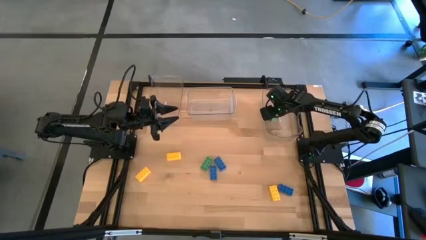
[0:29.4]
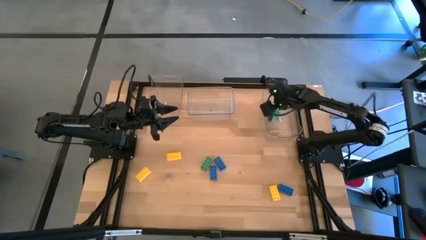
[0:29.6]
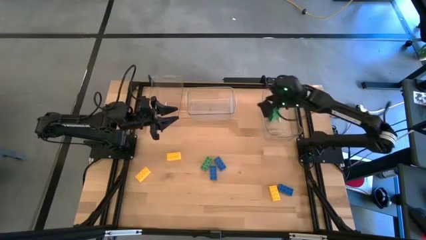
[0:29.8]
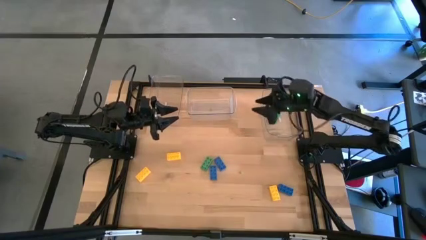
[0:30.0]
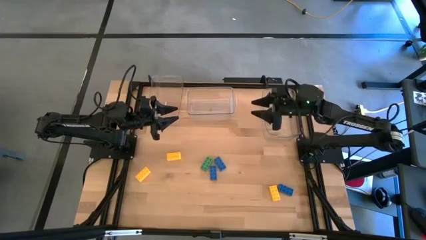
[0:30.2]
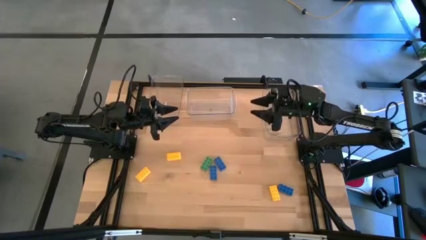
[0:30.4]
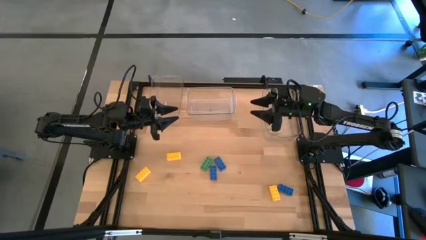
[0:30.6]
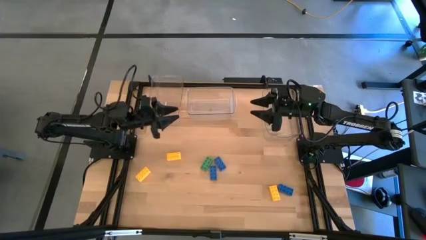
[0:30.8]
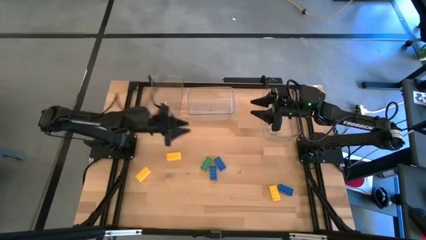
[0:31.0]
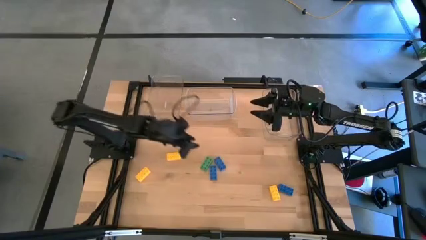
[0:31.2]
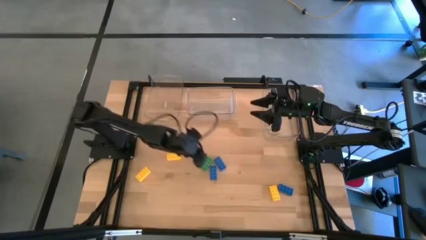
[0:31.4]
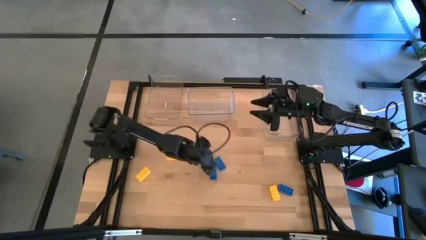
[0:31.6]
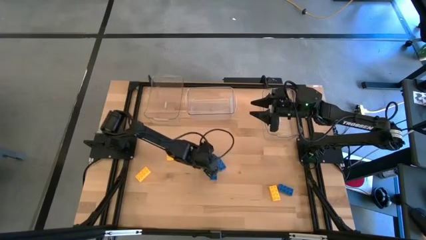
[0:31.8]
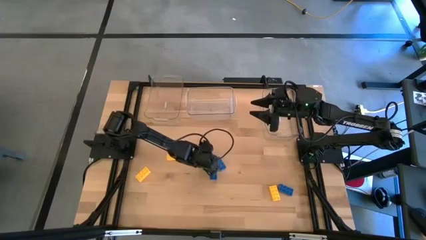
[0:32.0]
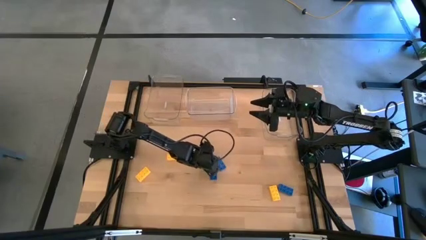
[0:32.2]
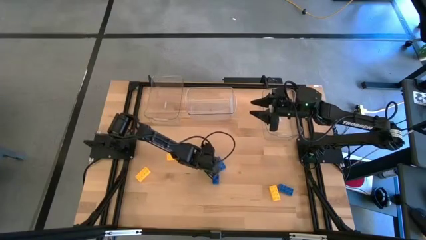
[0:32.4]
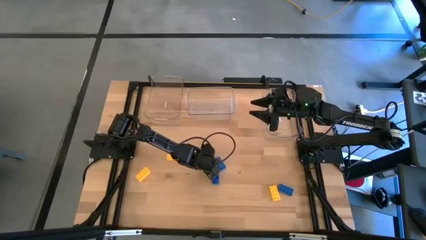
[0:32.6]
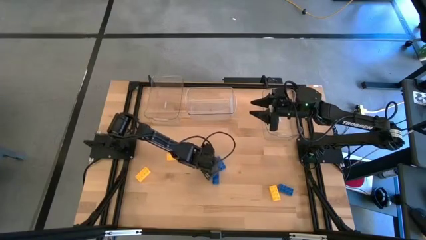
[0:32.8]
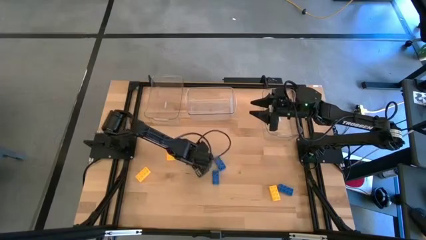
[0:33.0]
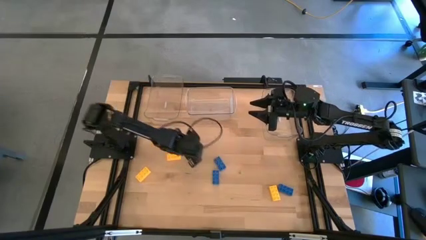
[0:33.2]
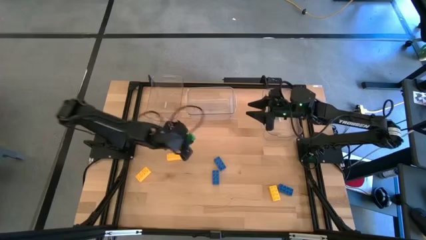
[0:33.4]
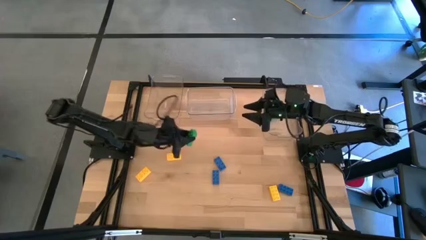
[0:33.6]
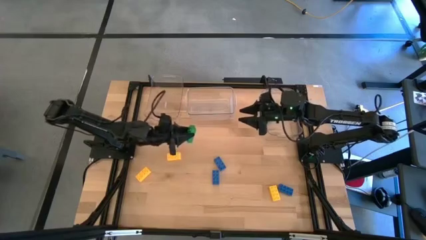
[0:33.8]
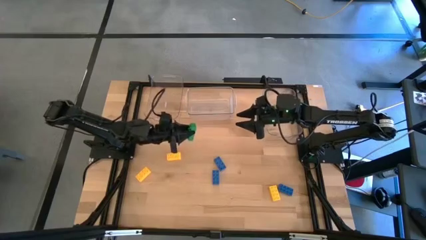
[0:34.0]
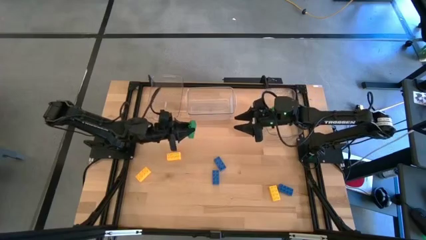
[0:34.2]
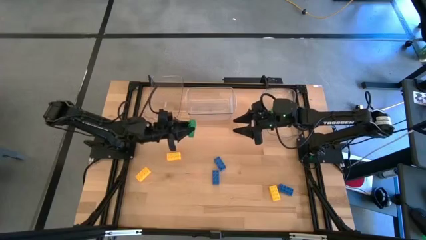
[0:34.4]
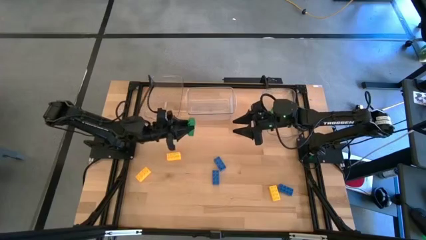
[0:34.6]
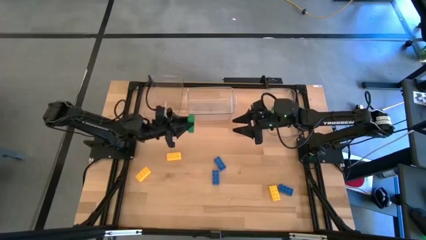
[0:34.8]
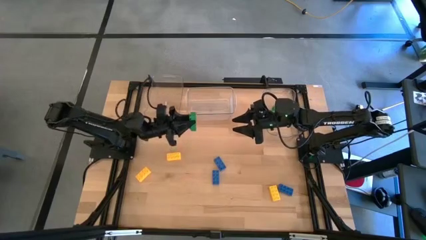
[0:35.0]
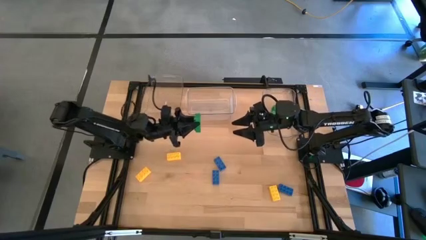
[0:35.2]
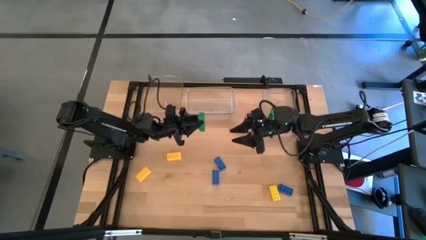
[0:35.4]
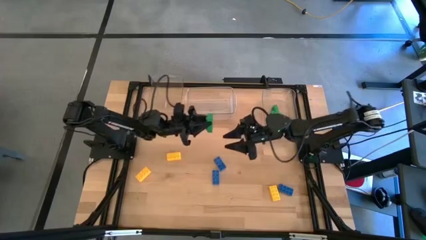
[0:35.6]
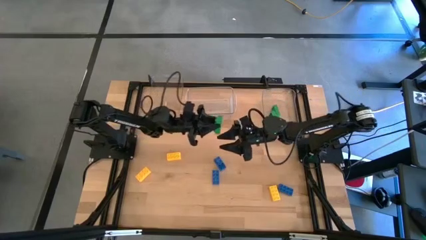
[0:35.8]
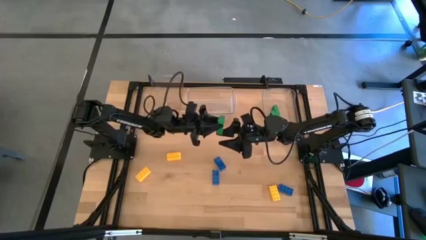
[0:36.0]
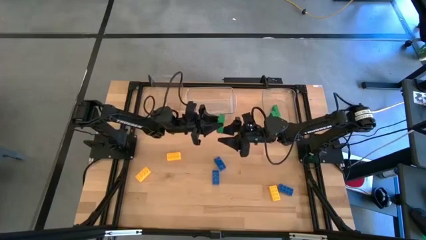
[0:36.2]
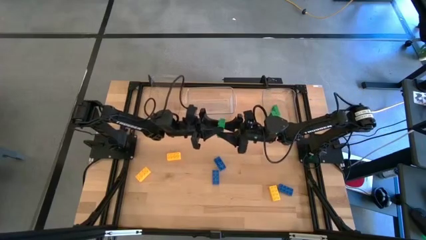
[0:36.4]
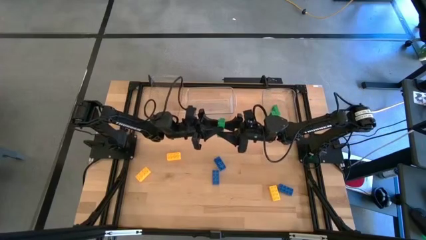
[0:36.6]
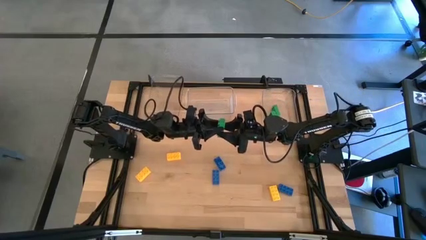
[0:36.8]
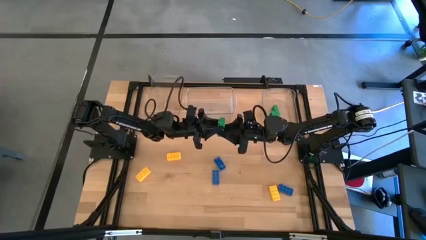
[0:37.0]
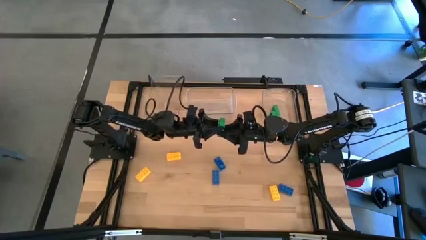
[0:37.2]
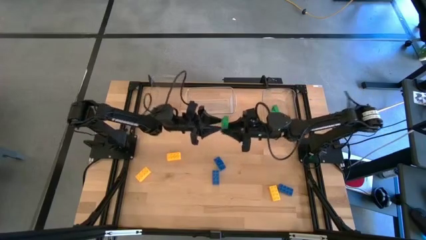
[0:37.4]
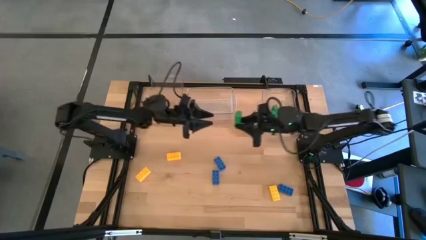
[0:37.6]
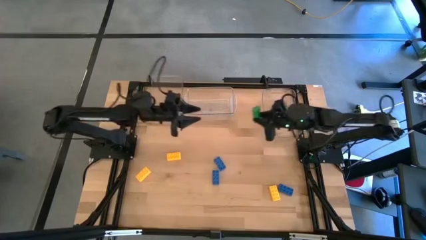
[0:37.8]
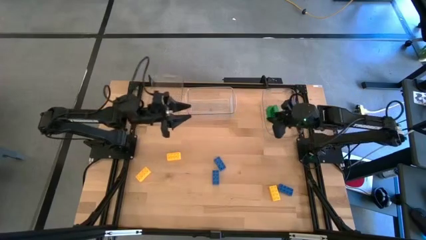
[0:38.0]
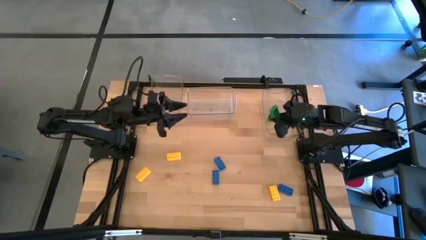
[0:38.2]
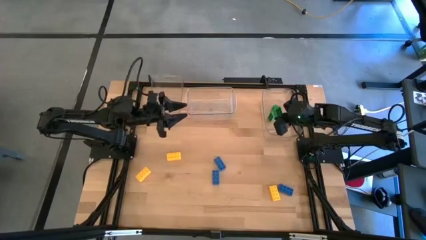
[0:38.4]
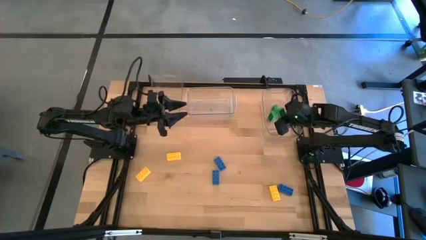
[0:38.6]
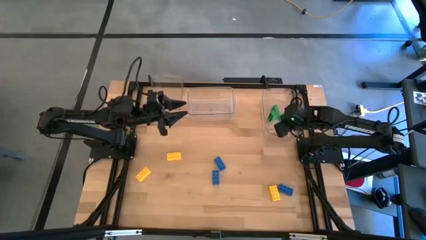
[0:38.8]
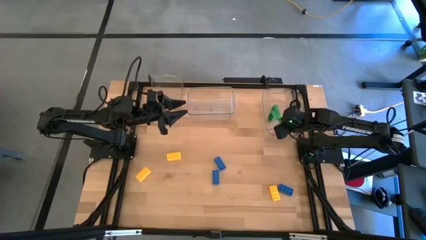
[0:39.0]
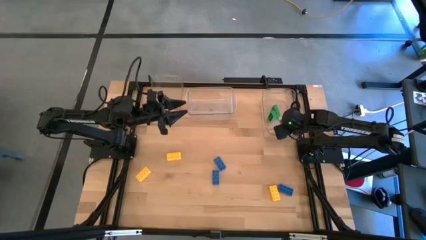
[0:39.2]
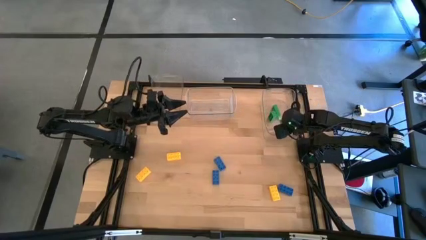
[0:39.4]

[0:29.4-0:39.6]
Task: Sort & place blocks by color
Put the green game piece into the right transparent bin

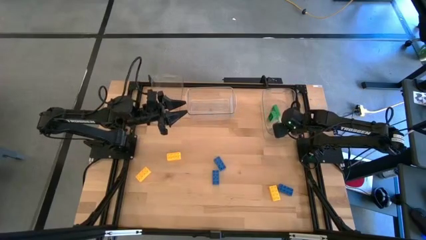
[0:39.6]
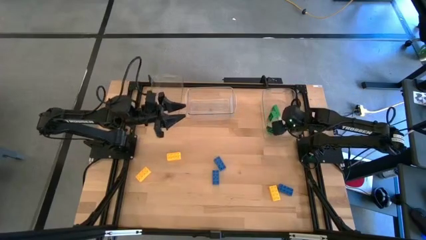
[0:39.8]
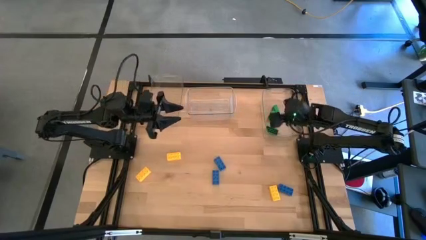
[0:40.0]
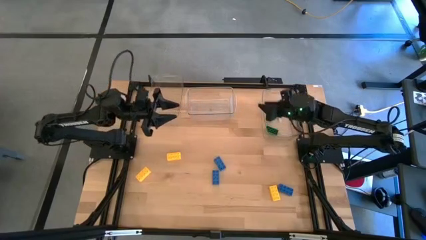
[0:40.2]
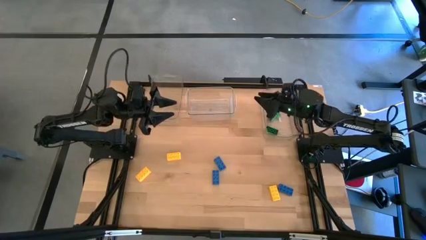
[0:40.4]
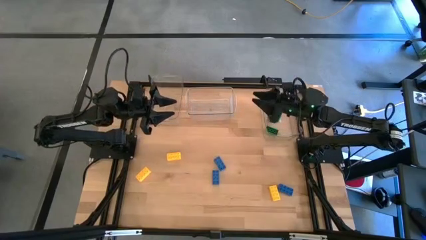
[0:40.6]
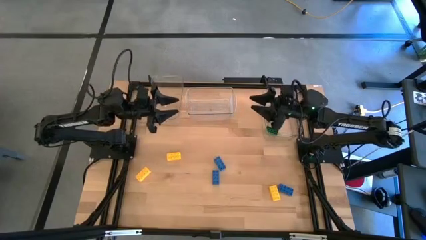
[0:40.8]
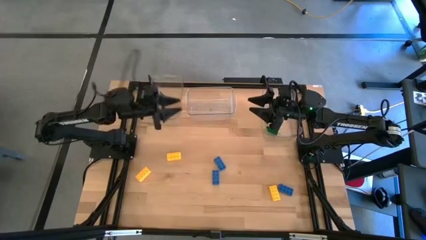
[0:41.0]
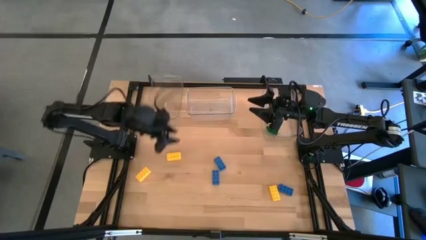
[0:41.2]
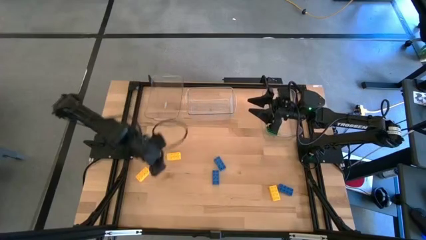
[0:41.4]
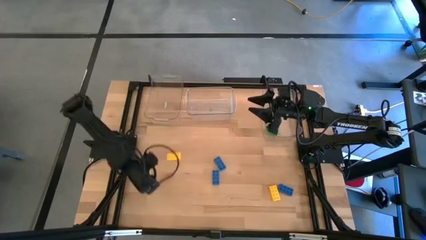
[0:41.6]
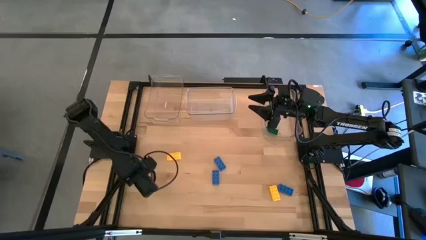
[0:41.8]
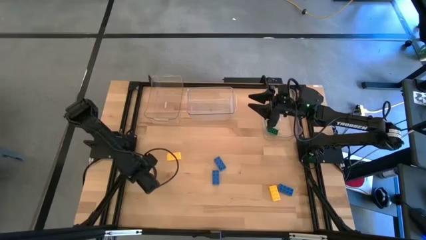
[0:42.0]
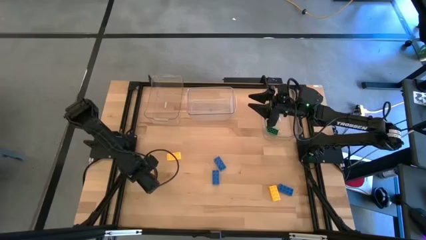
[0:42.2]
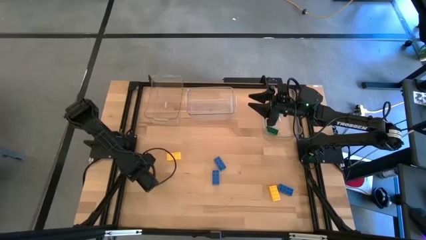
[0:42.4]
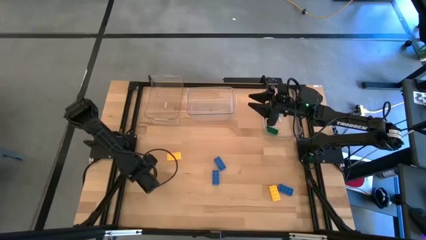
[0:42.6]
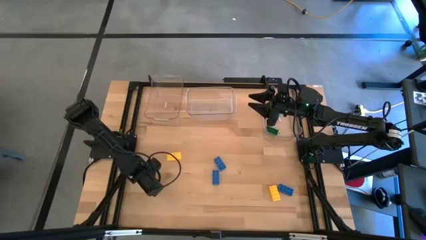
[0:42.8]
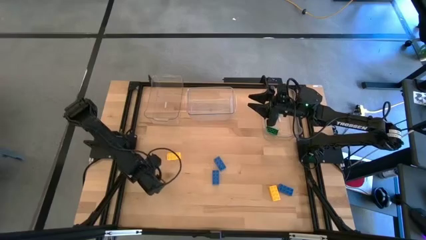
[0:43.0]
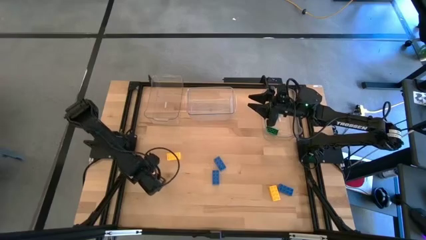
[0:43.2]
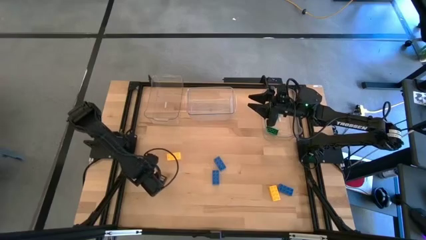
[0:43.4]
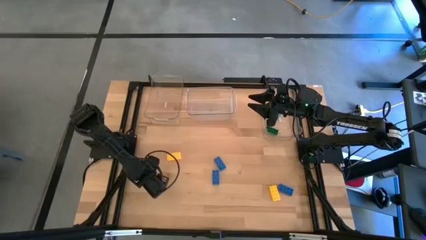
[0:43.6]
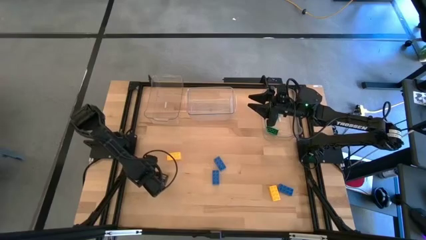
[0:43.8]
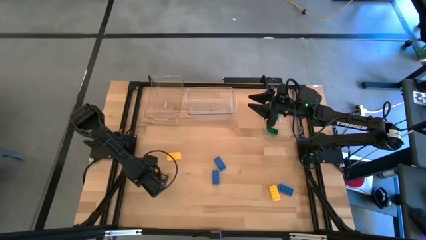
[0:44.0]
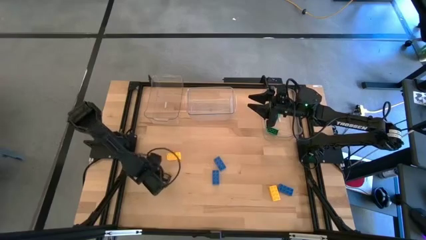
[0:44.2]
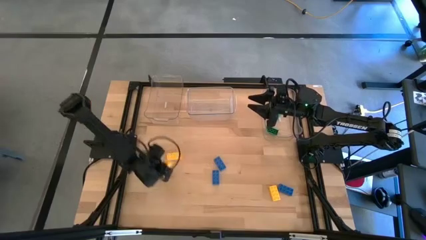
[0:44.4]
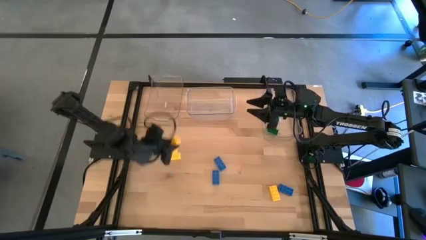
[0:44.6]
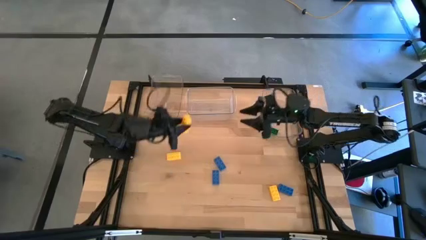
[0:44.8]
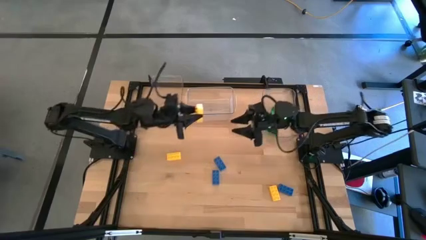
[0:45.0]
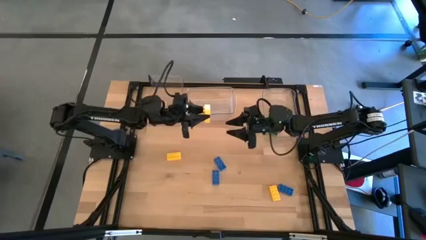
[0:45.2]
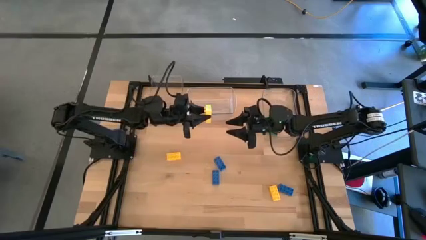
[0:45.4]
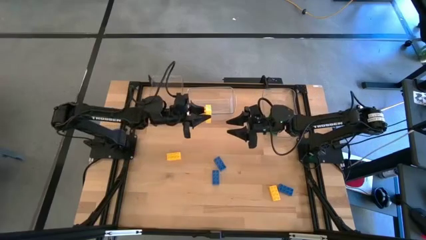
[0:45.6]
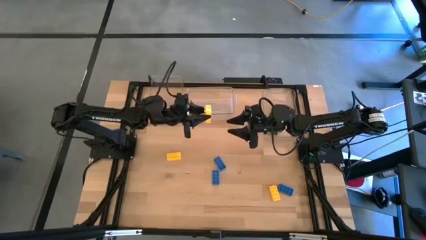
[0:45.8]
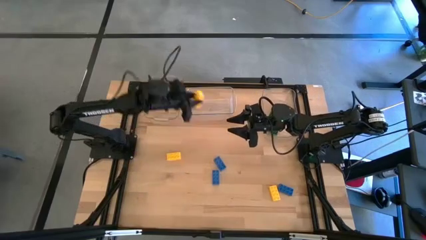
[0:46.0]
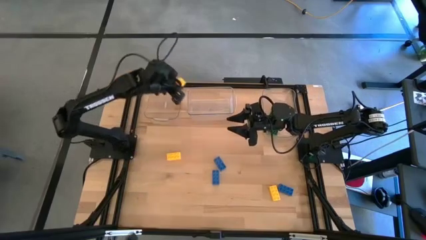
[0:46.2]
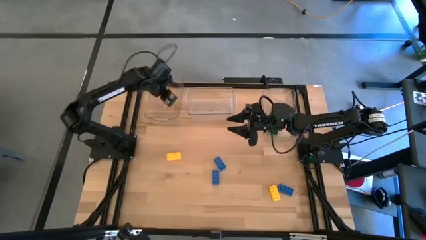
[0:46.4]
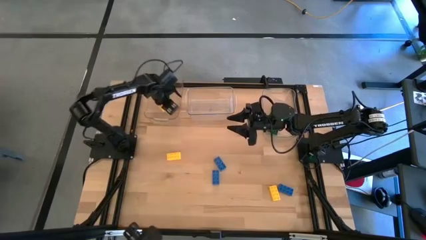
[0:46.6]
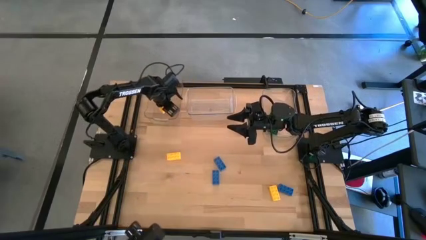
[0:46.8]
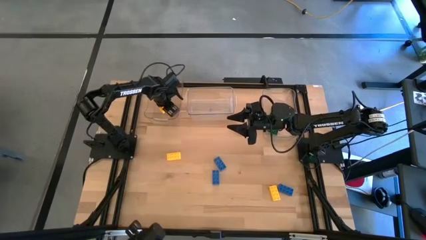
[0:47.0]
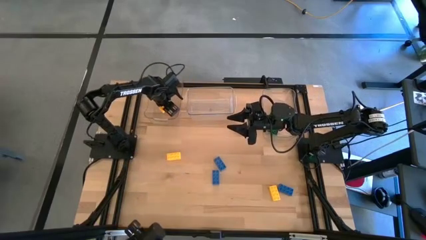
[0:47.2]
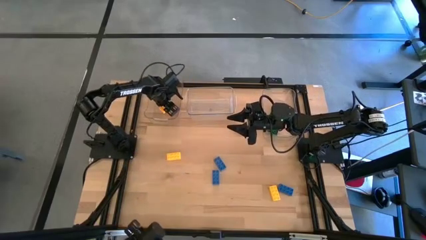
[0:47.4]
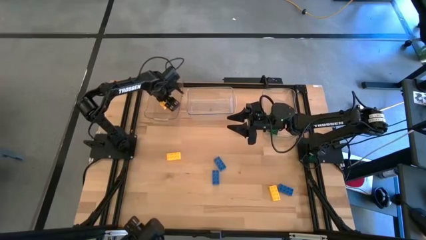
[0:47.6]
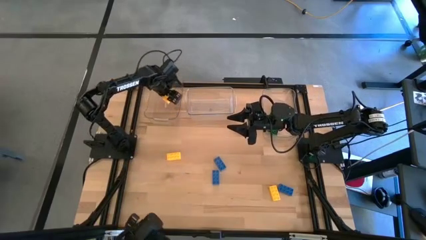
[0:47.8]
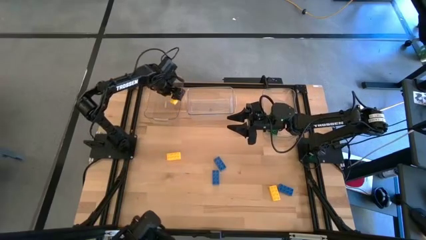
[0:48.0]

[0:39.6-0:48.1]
Put the left yellow game piece into the left transparent bin
